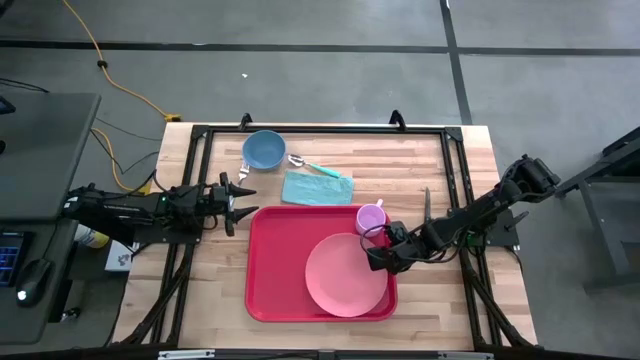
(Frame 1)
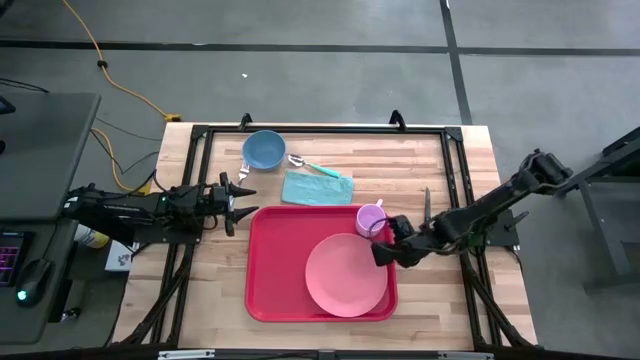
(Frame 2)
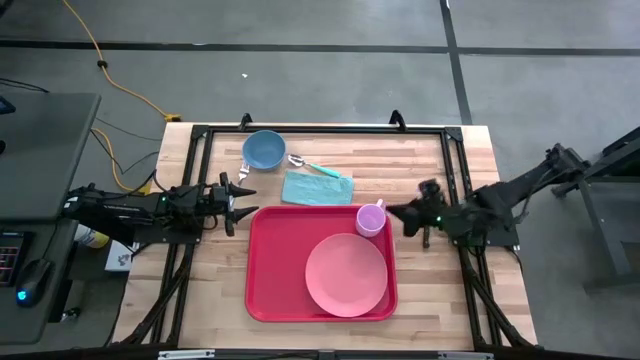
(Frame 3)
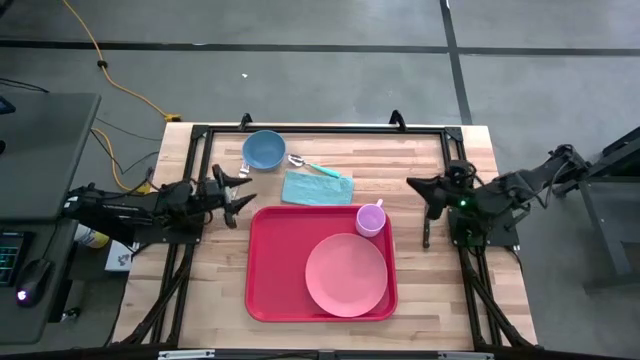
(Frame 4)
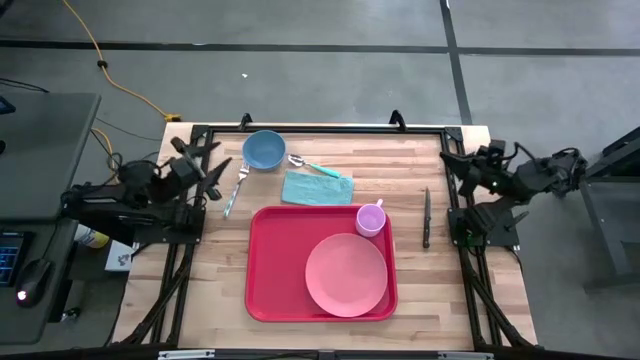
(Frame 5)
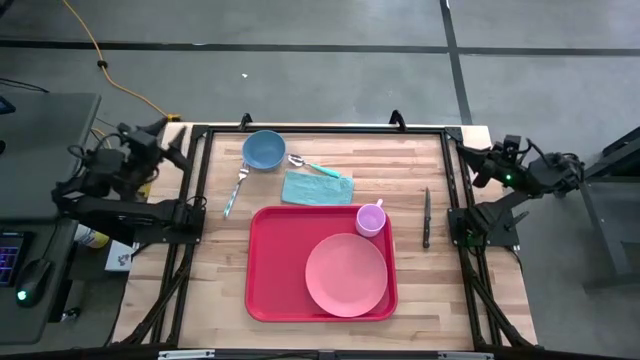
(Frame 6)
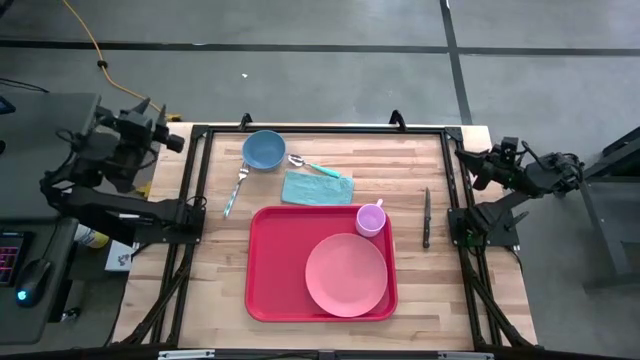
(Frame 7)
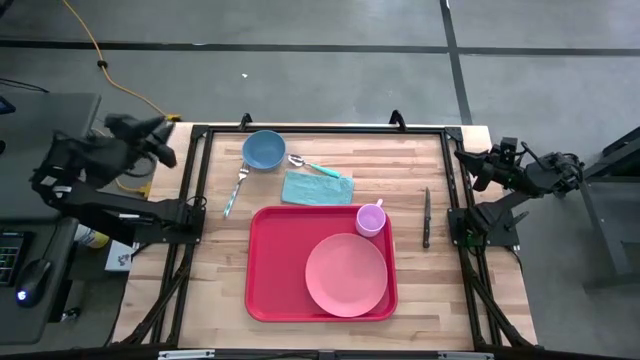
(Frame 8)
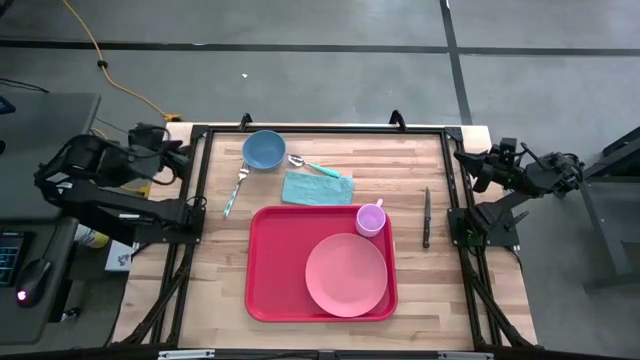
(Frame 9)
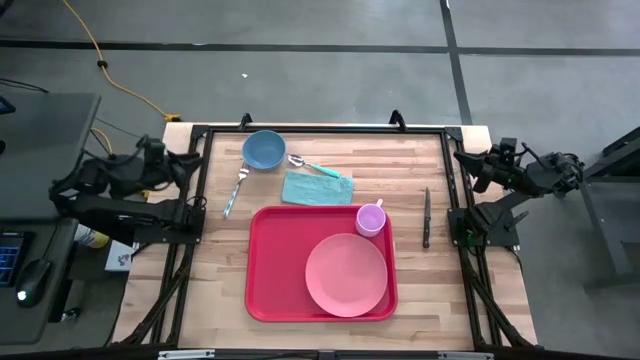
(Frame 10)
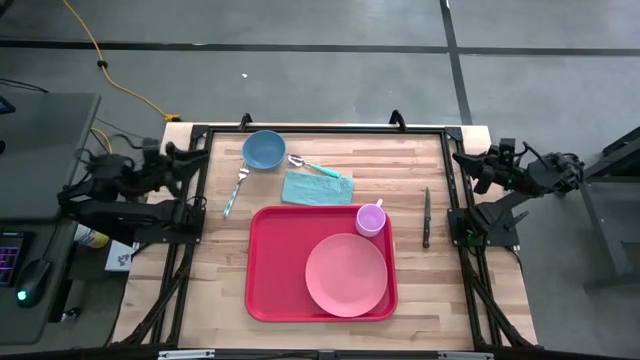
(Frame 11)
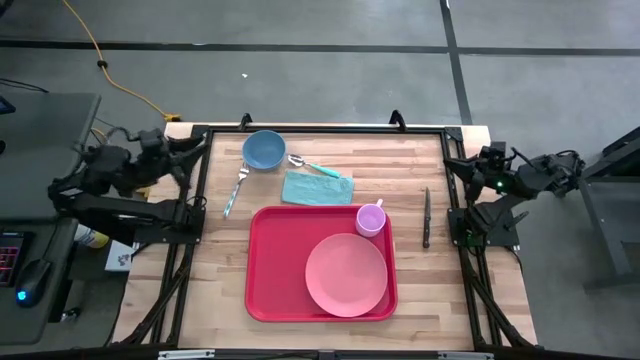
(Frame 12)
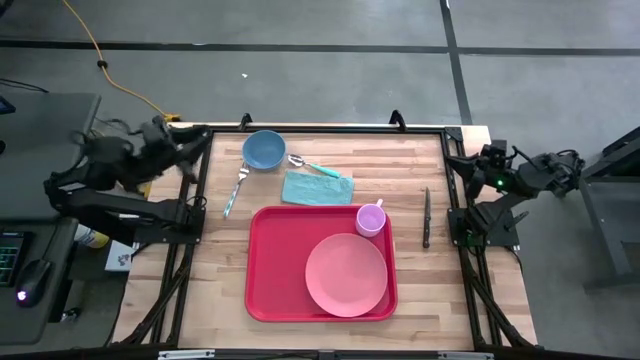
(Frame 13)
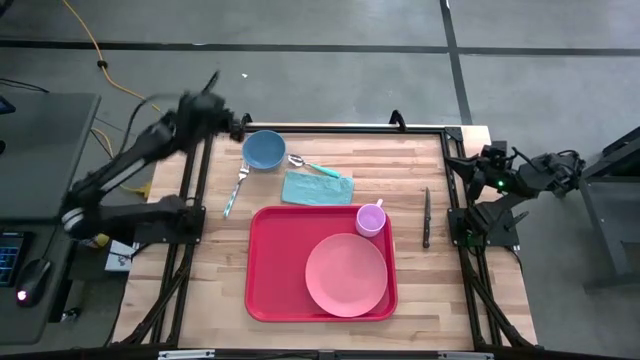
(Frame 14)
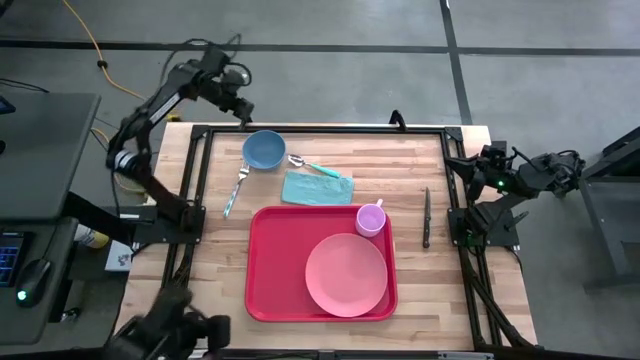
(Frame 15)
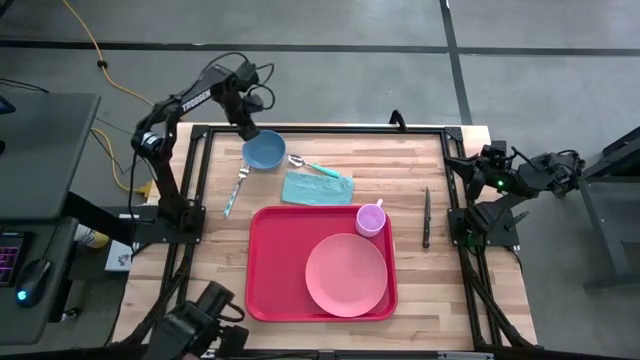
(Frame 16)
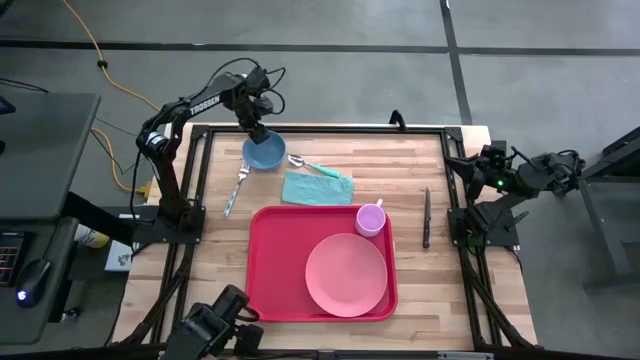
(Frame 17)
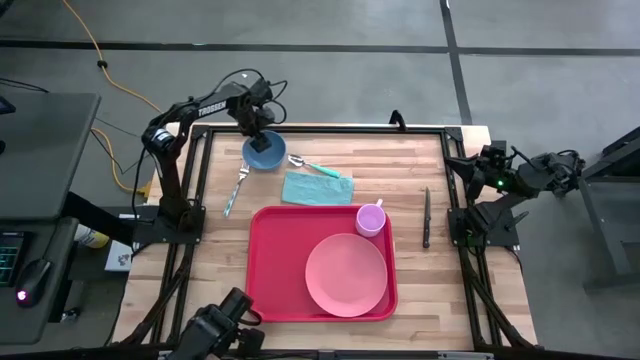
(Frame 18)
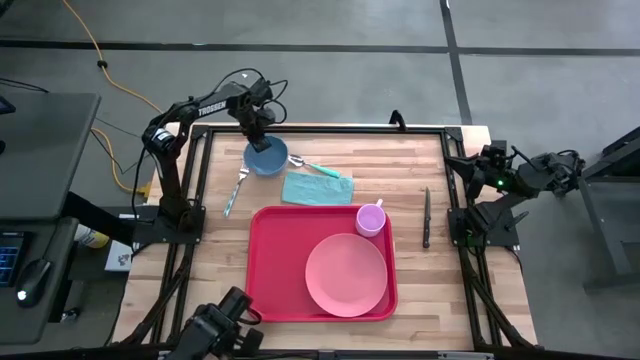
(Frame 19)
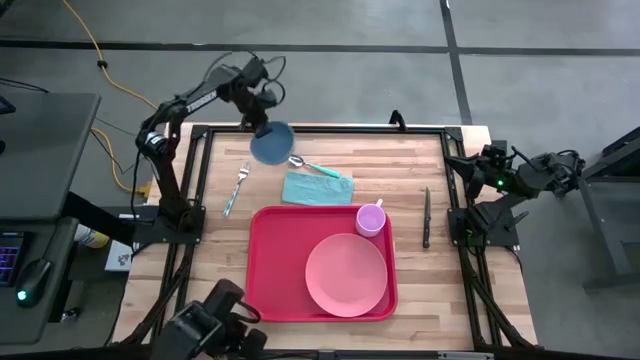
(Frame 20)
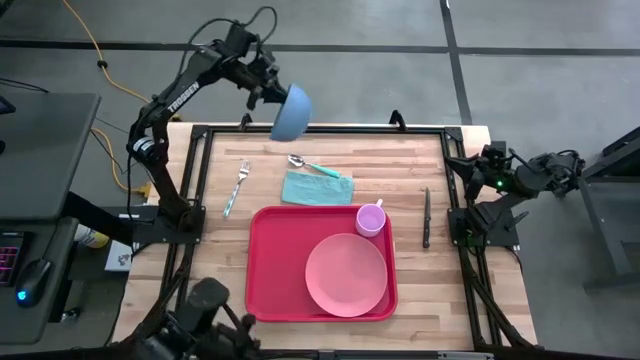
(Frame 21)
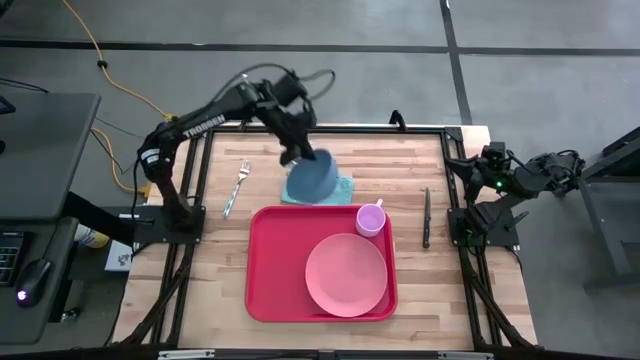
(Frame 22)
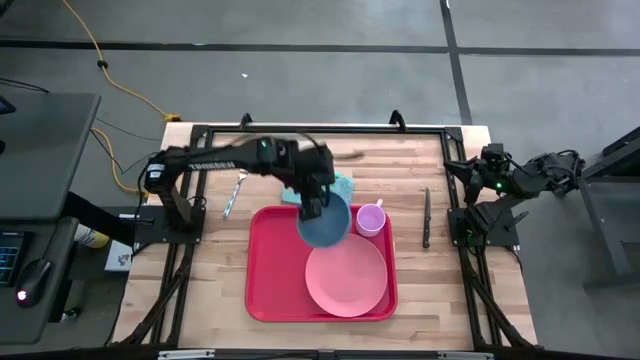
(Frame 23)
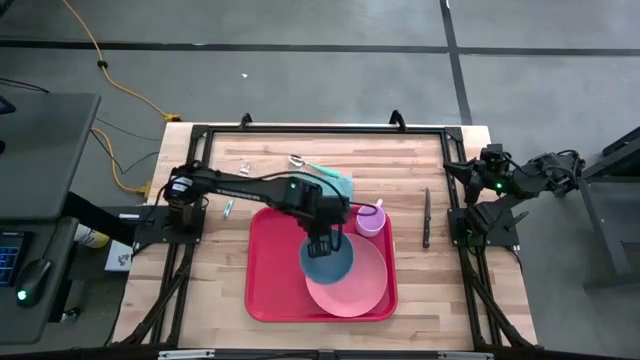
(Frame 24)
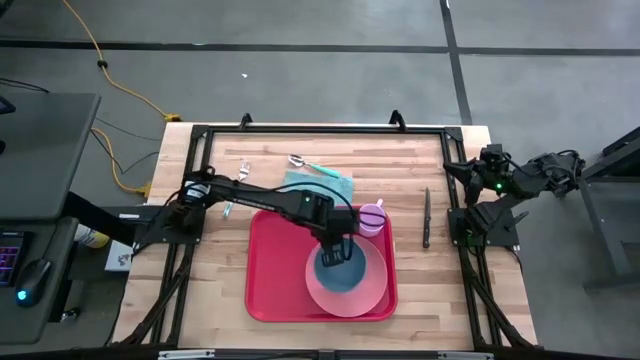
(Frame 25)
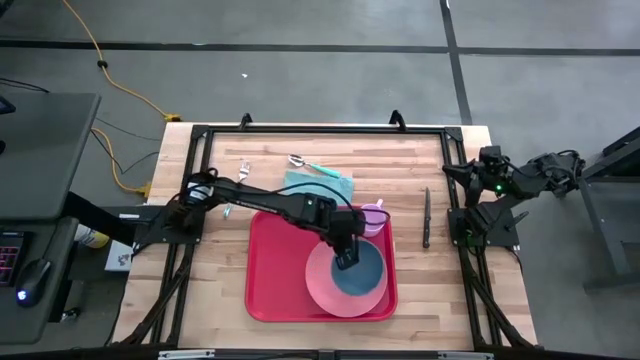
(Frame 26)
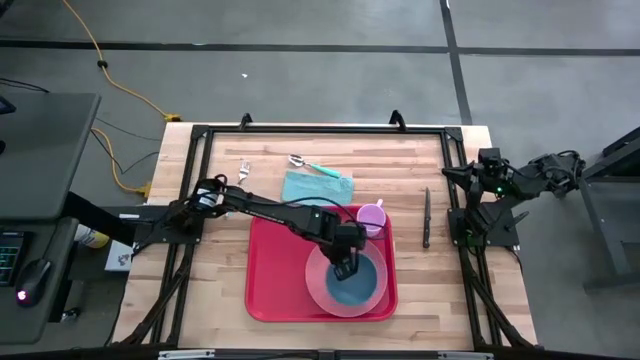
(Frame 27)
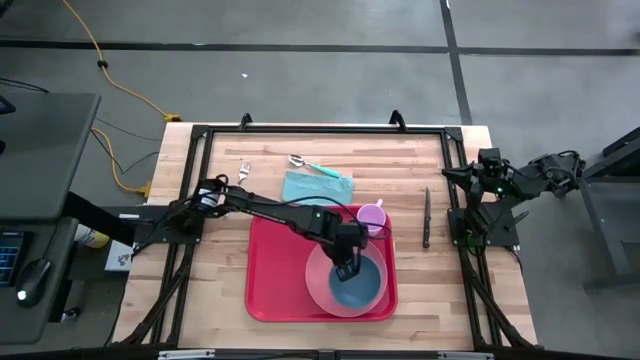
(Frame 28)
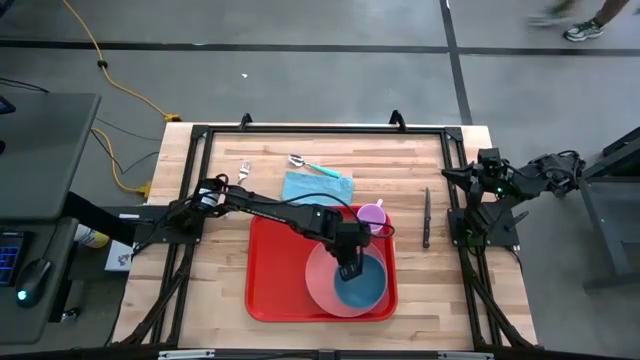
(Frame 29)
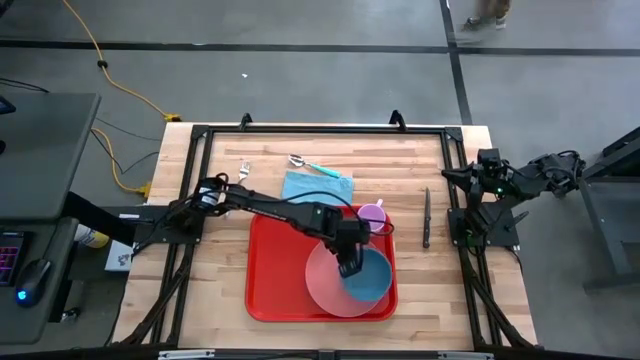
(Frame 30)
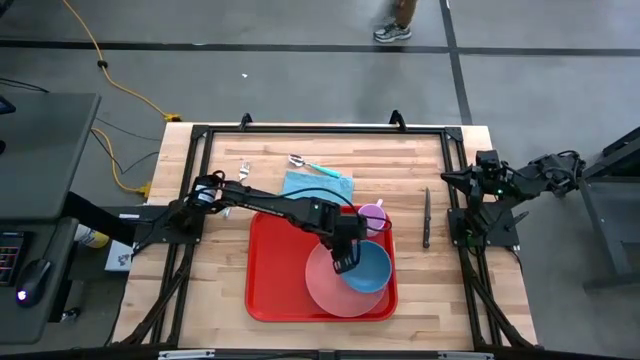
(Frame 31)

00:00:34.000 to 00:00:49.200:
Task: Set up tray
Put the blue bowl on the pink plate

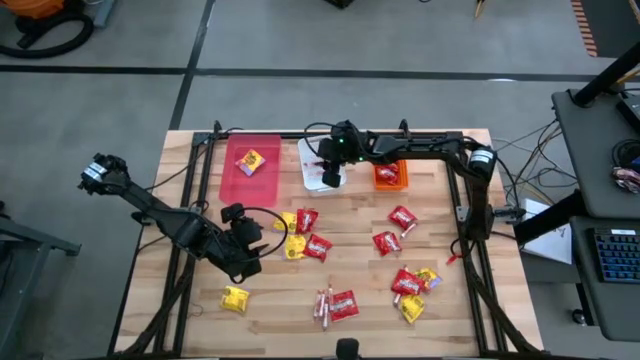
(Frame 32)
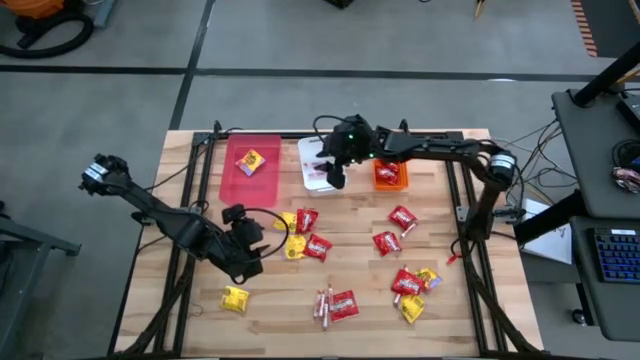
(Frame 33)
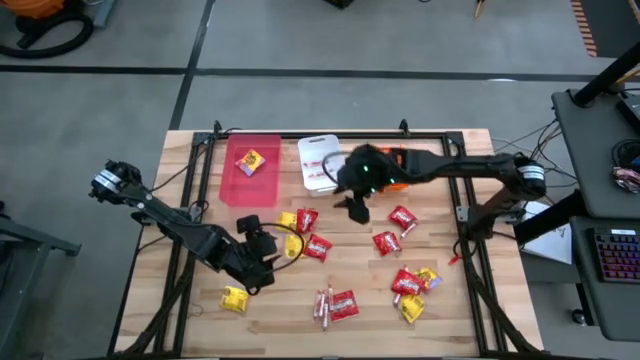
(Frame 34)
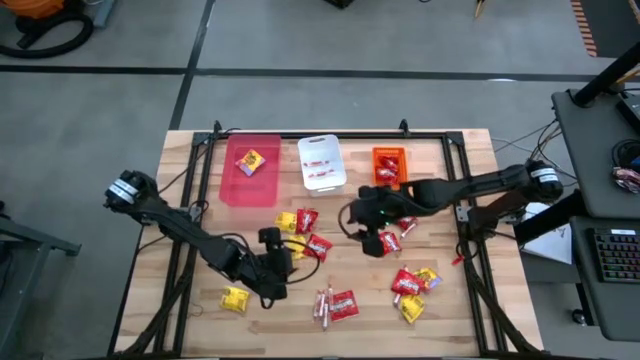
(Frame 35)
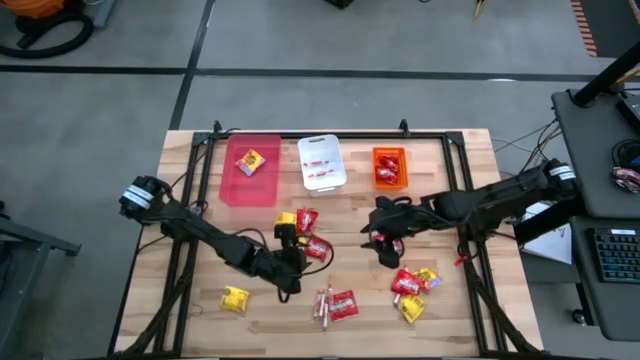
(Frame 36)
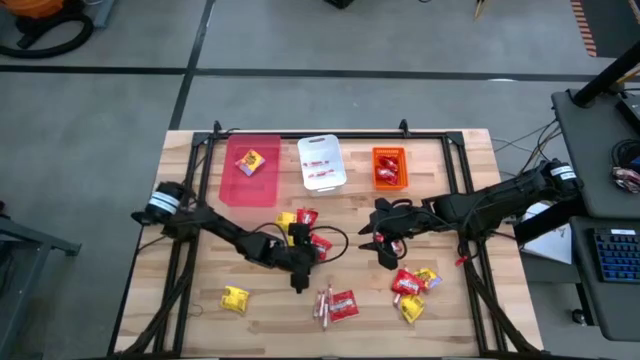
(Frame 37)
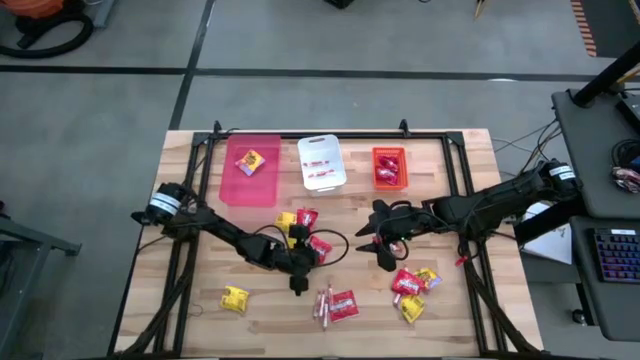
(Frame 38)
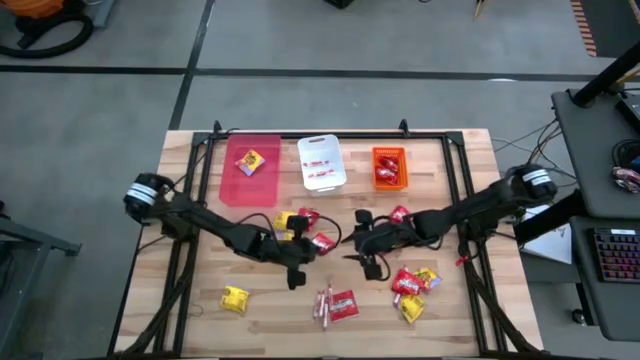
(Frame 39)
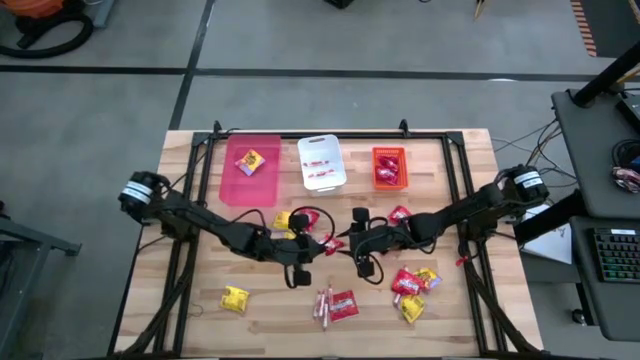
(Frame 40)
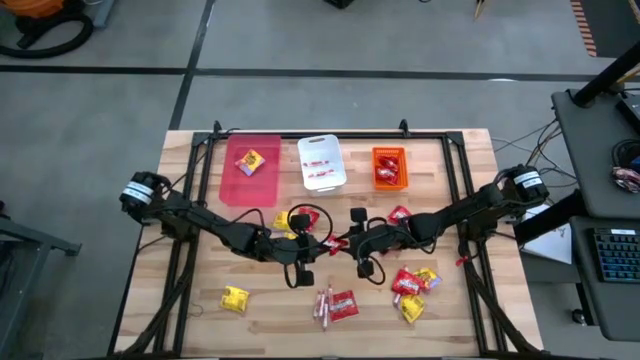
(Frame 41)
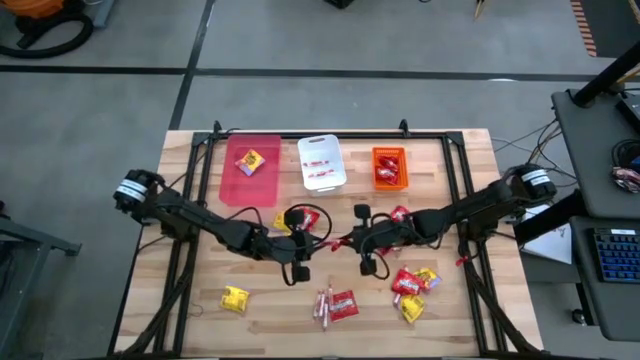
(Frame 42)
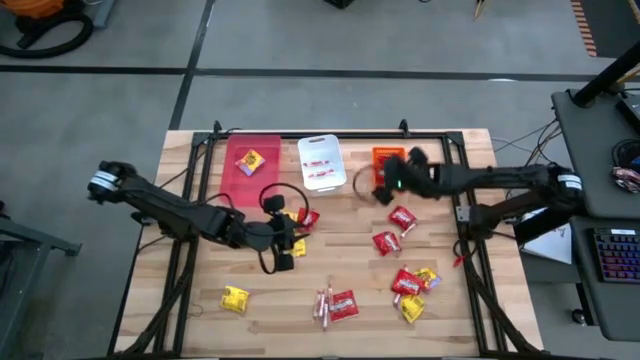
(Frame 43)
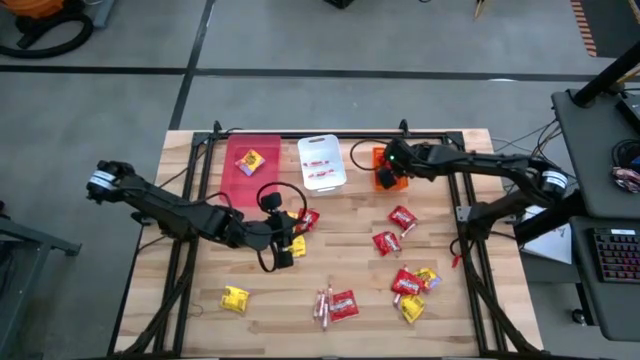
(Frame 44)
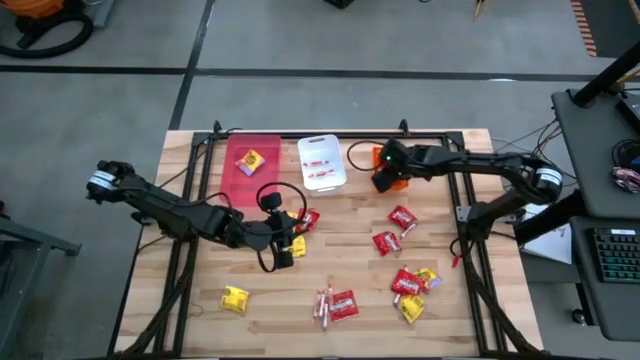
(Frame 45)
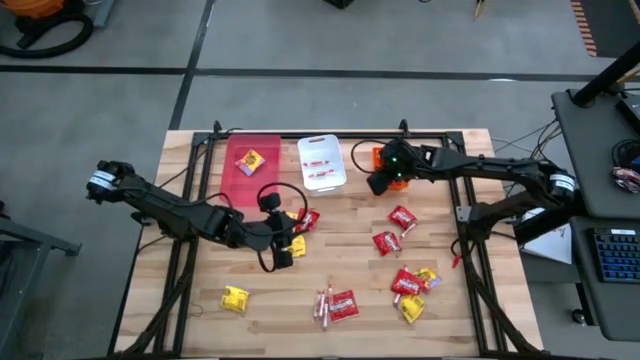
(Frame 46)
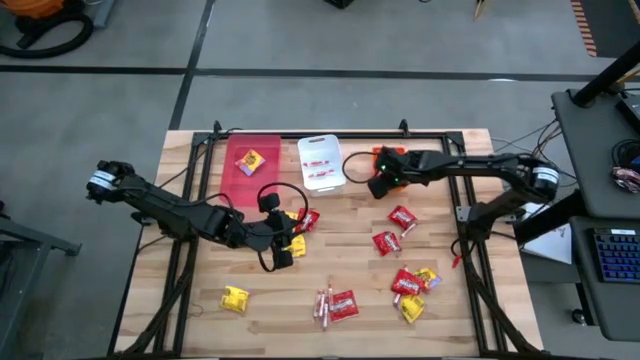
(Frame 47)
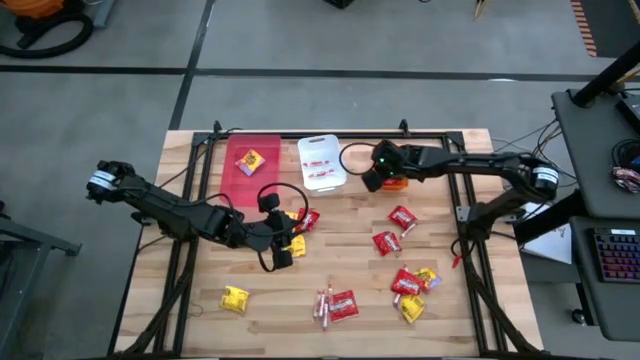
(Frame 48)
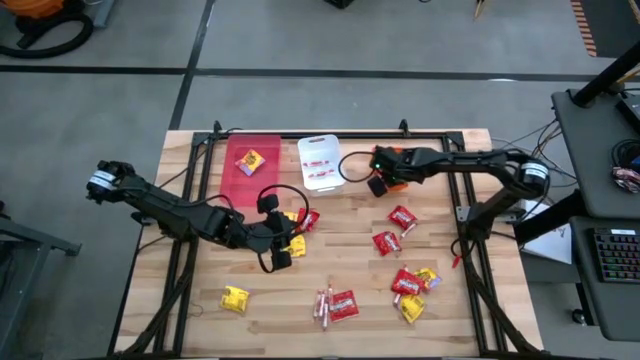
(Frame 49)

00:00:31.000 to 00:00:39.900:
Task: Sort candy
Put the red candy into the orange bin
